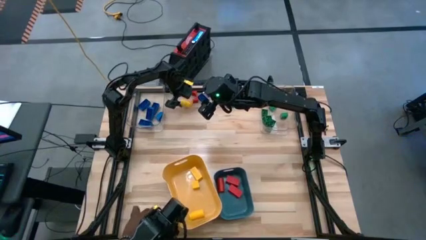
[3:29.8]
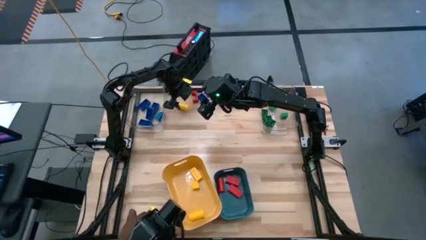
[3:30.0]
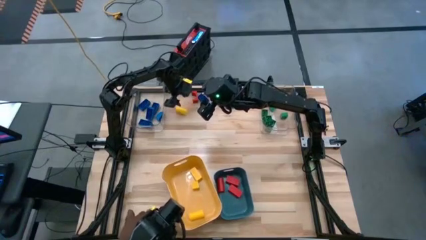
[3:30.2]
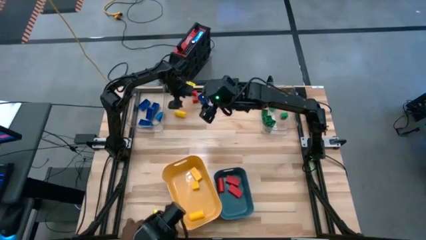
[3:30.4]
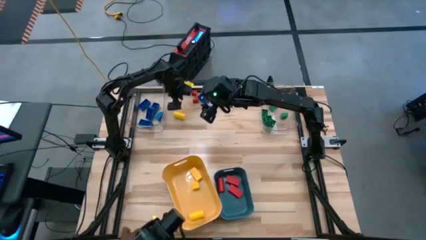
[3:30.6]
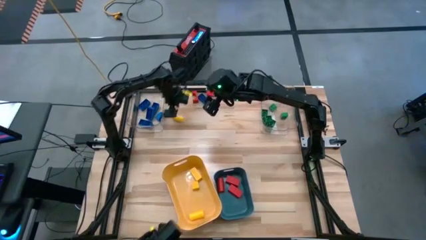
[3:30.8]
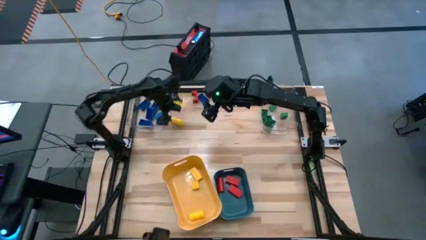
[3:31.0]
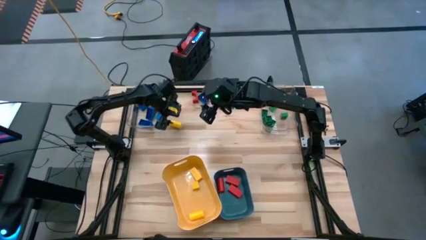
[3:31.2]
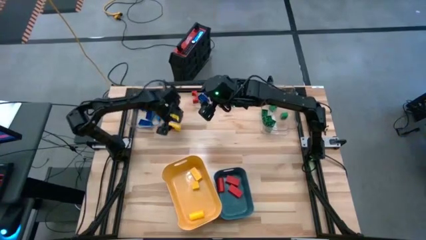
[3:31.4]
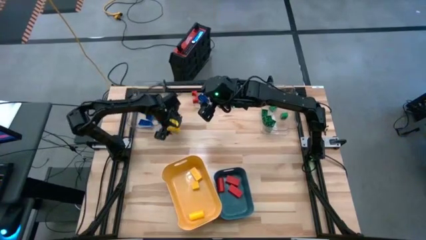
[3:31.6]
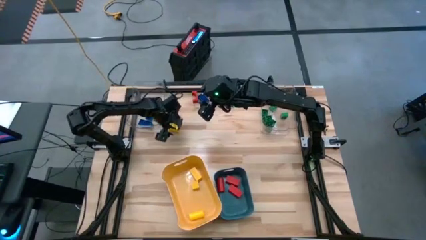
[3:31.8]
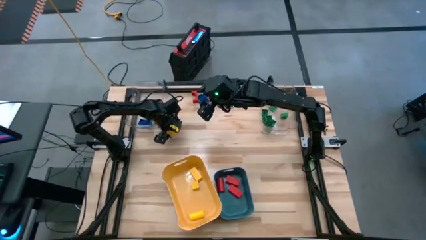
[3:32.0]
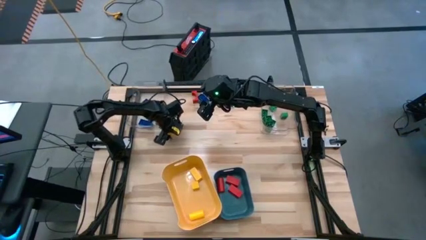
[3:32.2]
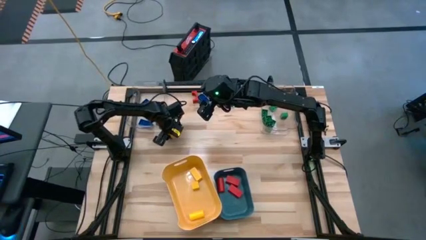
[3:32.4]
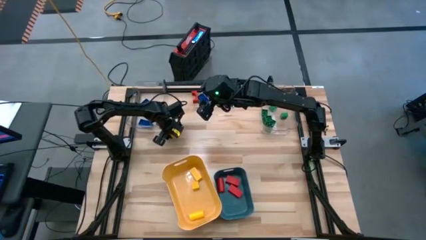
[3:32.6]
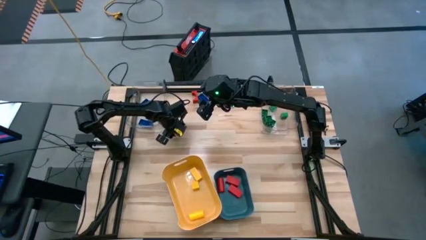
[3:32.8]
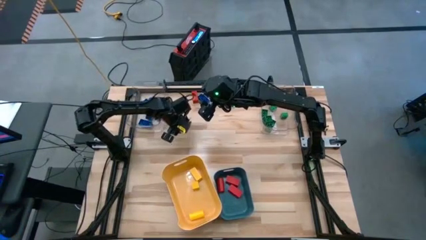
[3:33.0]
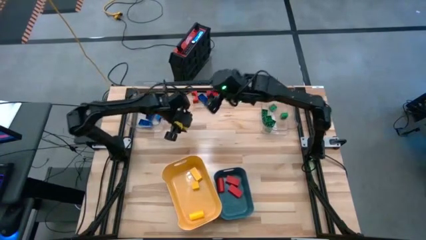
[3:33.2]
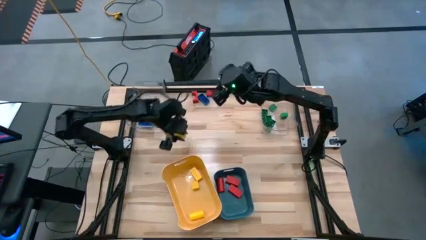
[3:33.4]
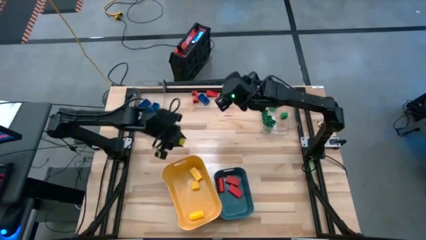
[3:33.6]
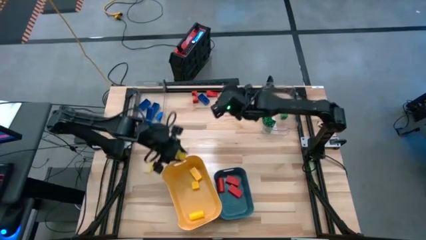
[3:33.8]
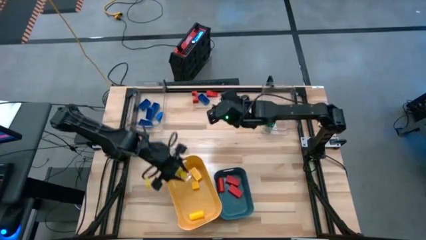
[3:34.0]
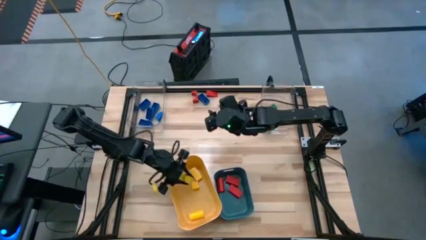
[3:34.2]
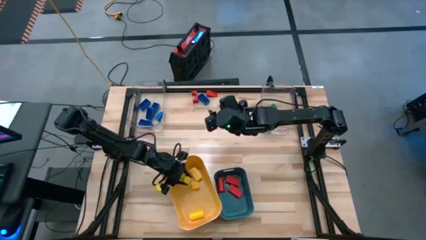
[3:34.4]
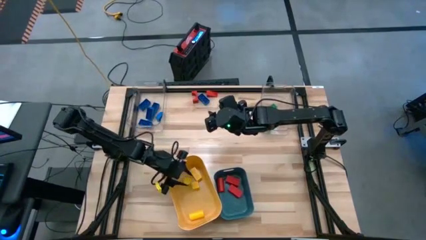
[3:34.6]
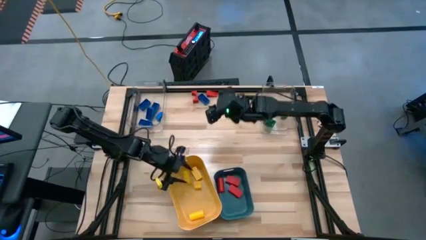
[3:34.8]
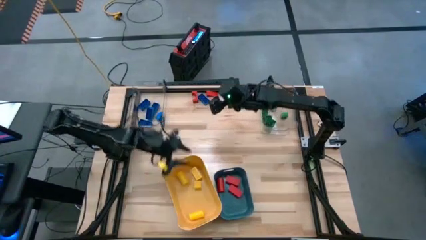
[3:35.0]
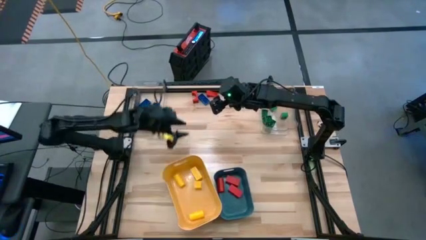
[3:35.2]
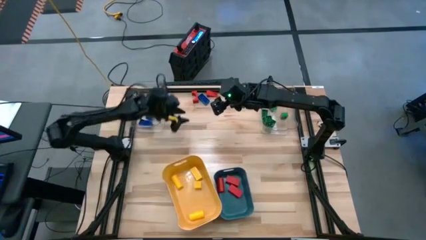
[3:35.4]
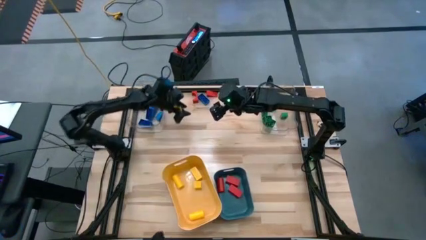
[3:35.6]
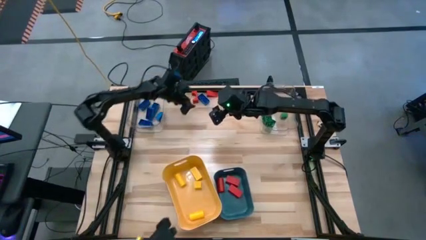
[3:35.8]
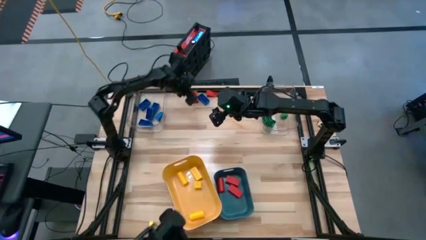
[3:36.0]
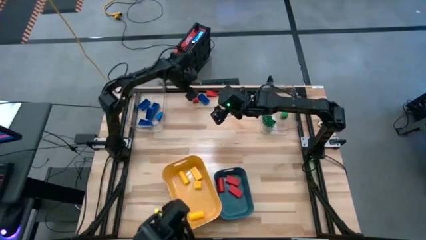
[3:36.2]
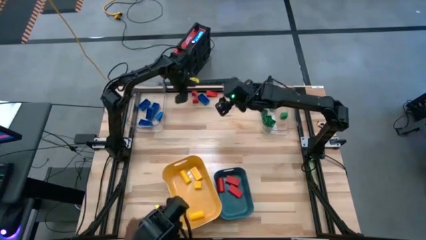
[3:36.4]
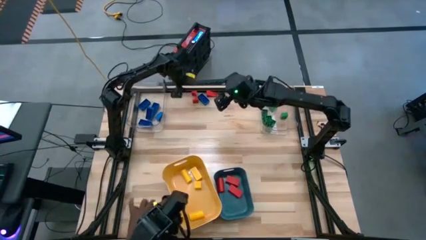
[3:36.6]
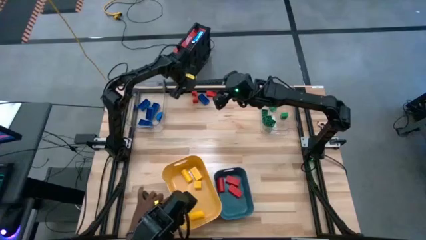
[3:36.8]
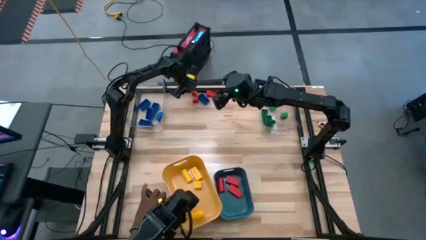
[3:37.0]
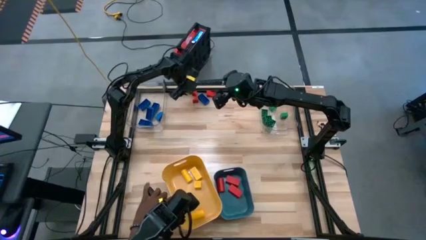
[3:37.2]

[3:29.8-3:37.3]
Task: Sort blocks
Put the yellow block into the yellow bin

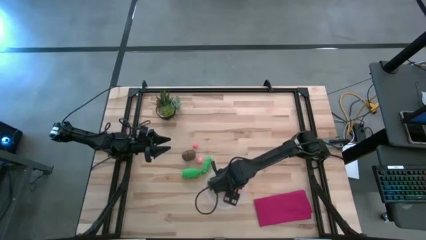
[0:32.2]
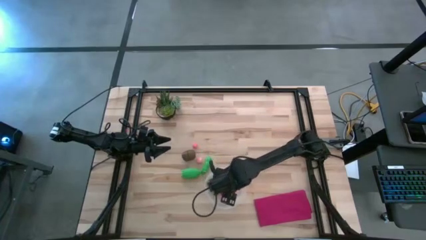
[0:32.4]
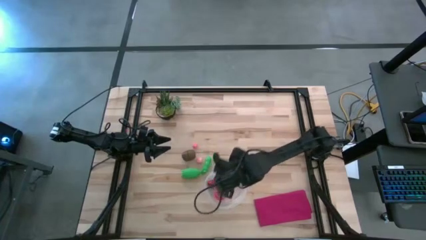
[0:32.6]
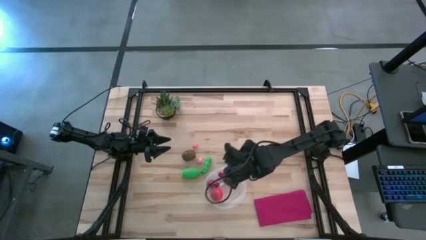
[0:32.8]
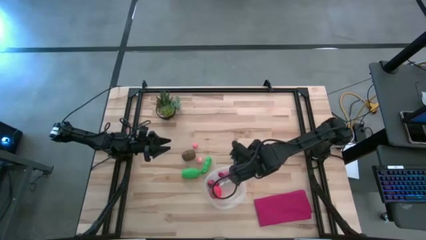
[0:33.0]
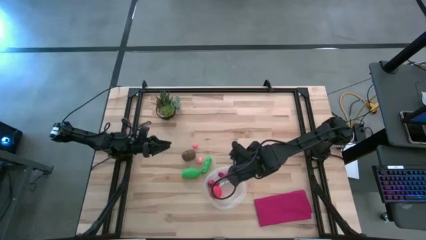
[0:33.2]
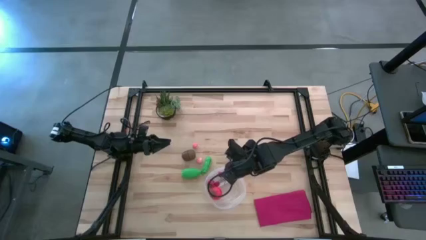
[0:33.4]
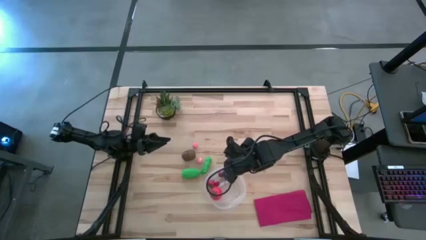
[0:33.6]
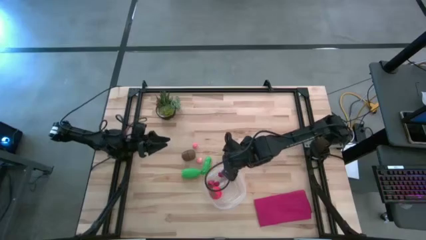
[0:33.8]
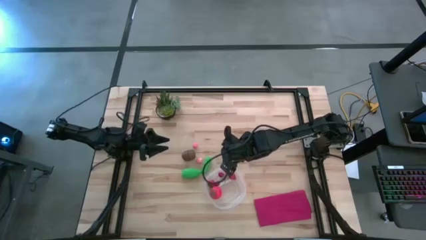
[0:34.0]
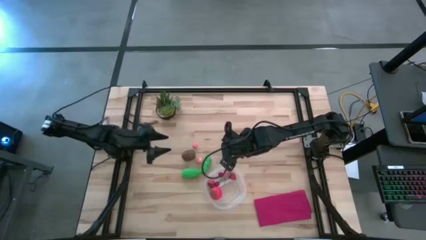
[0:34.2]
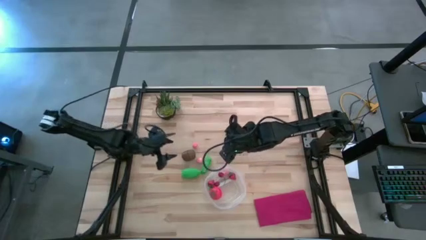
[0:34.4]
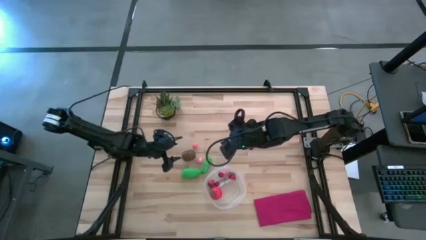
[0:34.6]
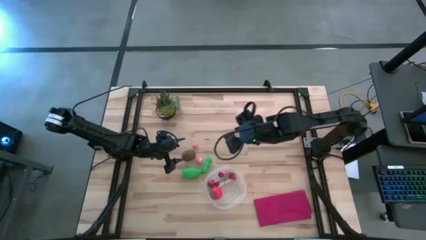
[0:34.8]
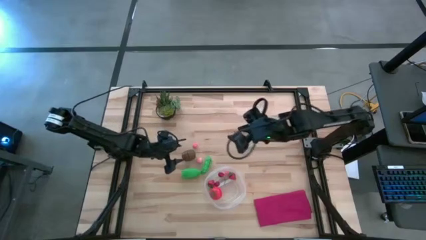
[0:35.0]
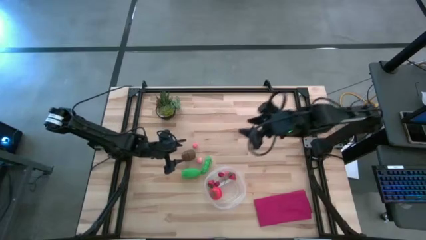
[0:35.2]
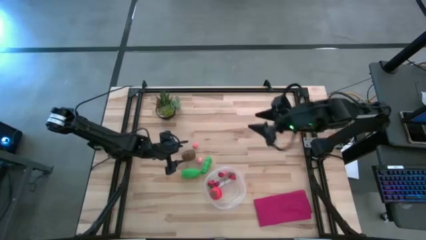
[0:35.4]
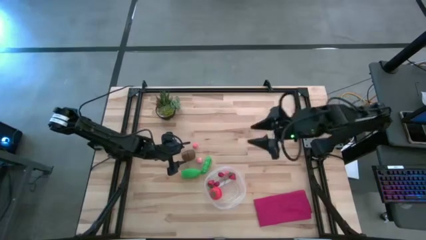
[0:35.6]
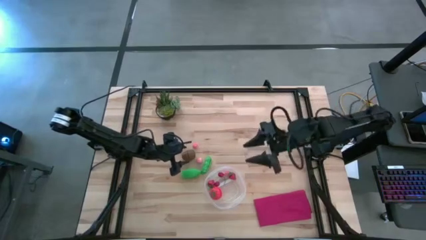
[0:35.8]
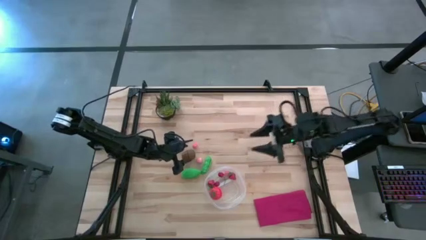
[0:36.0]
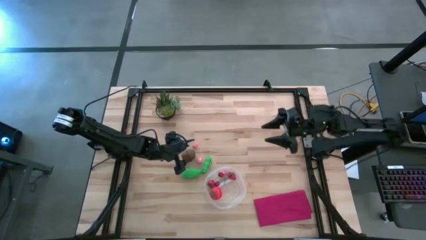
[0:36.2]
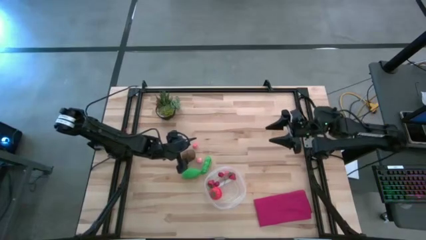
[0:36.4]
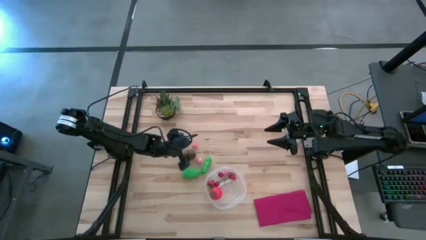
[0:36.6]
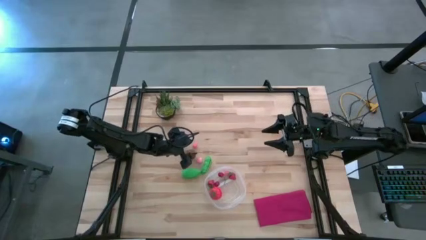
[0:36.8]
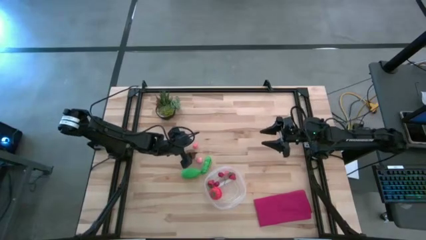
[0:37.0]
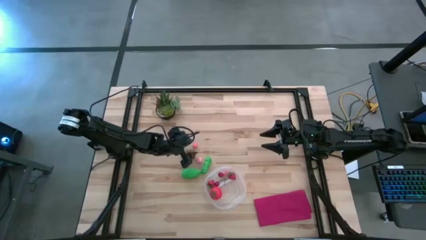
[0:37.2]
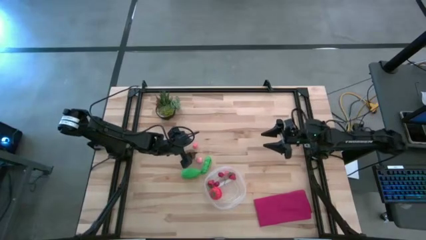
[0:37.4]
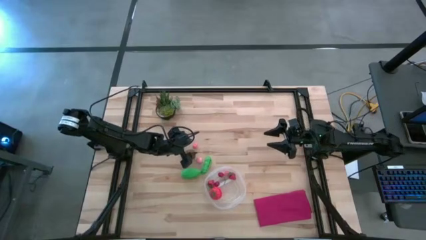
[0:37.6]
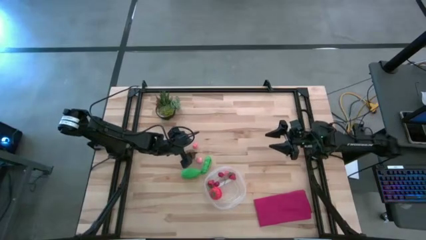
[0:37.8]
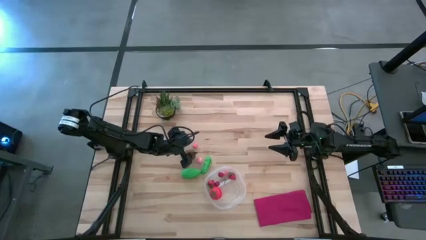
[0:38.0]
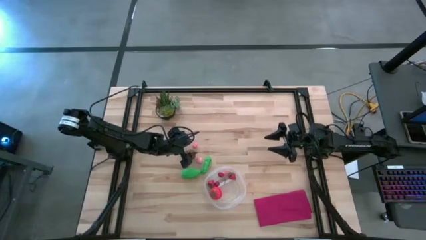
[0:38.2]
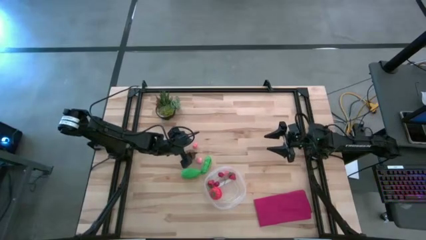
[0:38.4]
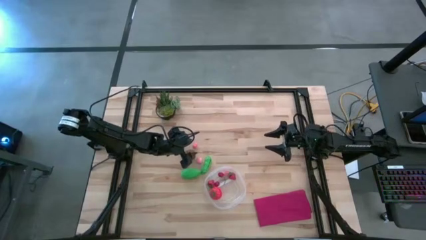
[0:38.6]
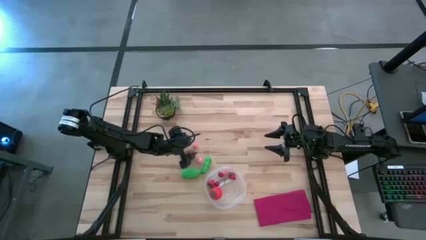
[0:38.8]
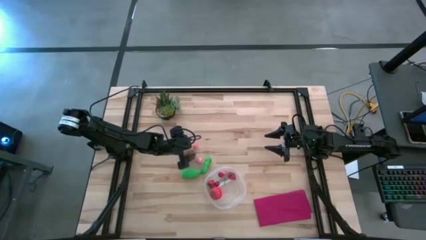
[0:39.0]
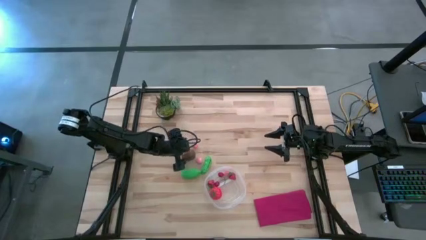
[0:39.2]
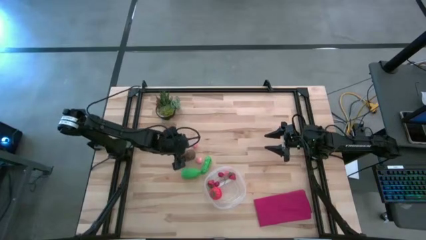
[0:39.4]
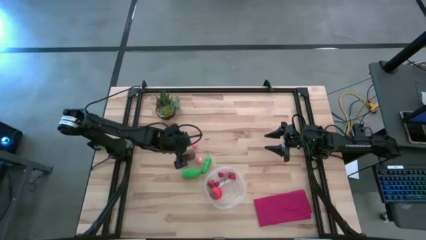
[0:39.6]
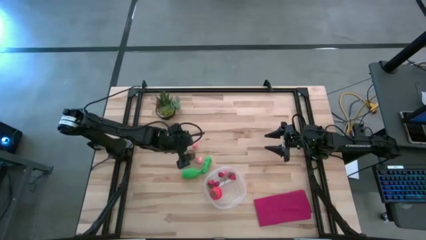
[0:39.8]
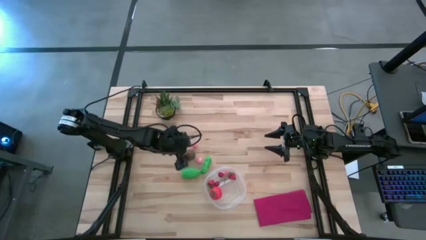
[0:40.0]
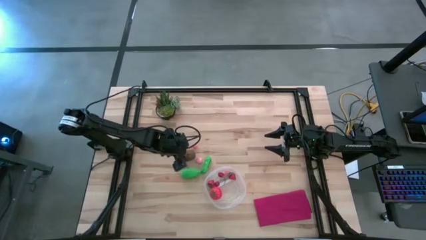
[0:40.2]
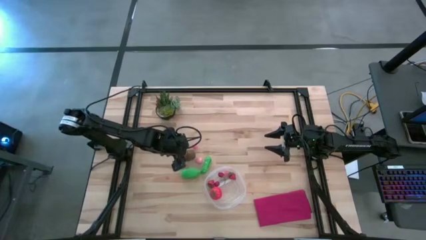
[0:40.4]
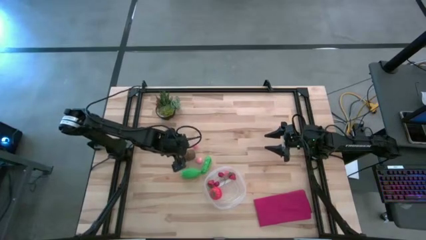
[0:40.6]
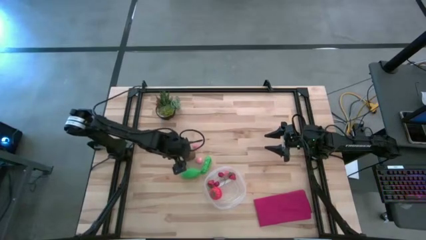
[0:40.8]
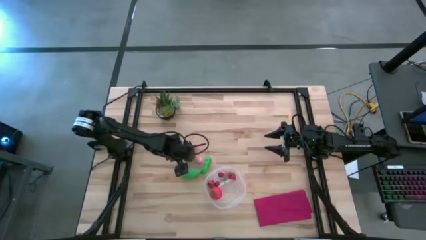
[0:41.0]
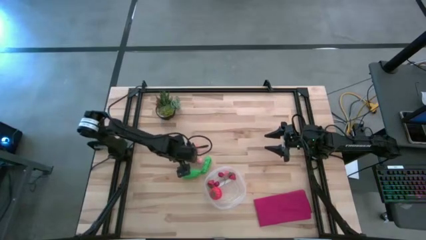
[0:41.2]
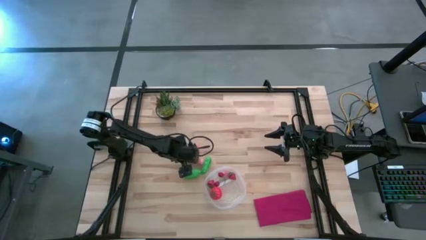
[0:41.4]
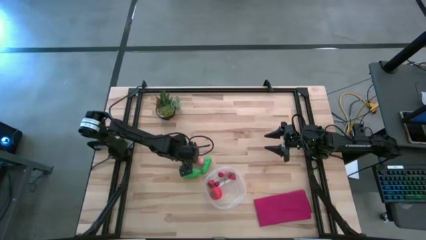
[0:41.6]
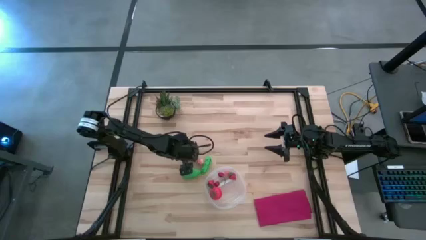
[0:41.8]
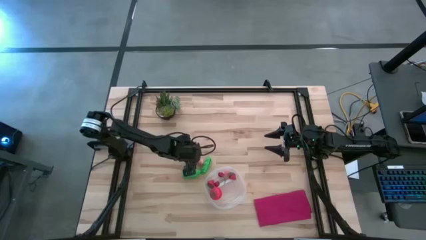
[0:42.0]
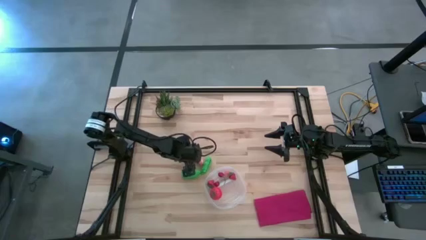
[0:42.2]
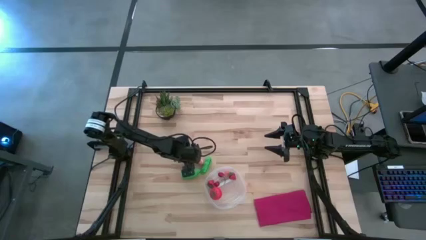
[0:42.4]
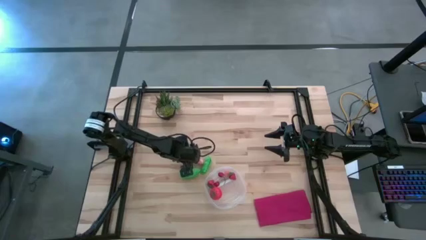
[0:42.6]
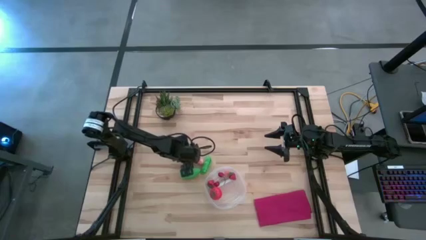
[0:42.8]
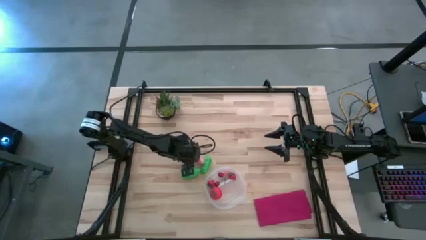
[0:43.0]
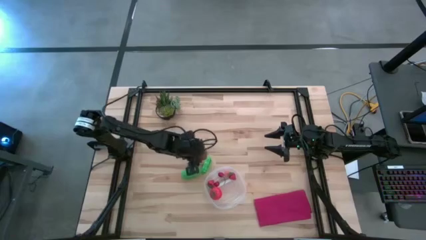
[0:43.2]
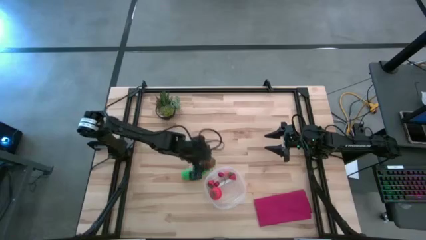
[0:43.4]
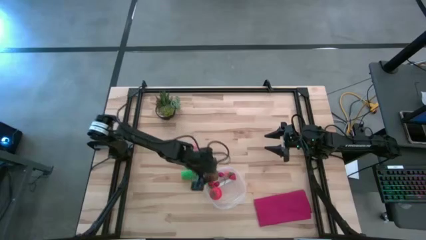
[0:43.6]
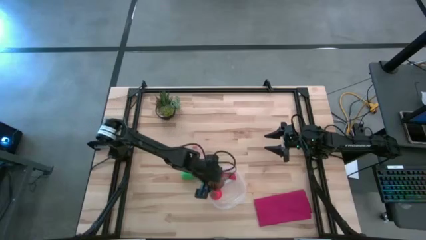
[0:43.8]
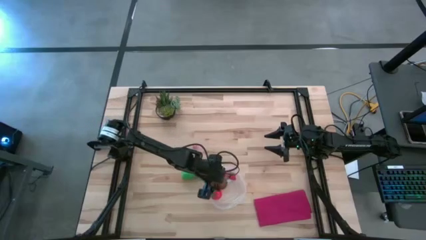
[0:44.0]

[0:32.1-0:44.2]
Task: Pick and placing Produce into tupperware
Put the brown kiwi into the transparent bin
